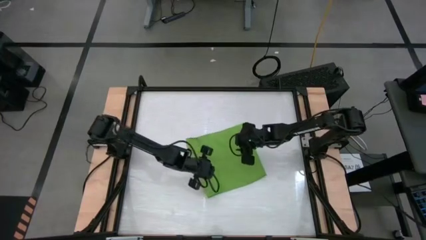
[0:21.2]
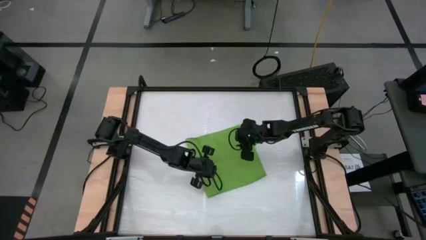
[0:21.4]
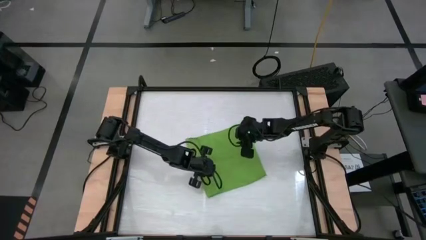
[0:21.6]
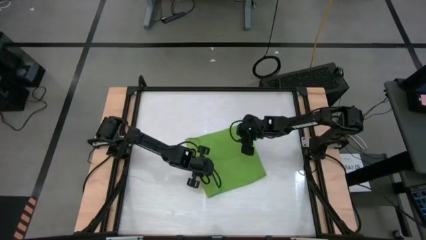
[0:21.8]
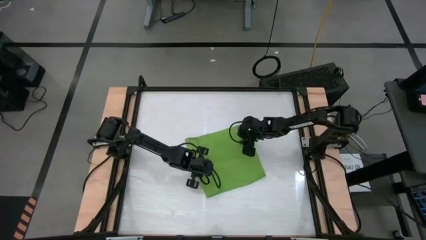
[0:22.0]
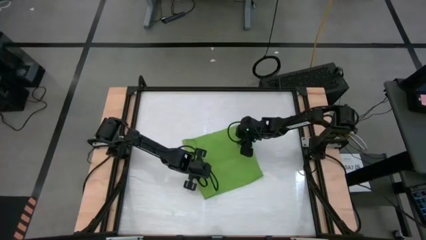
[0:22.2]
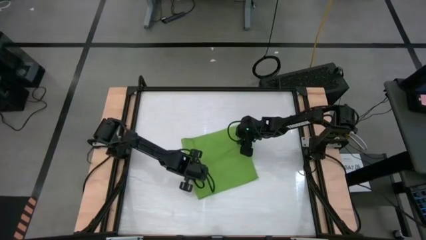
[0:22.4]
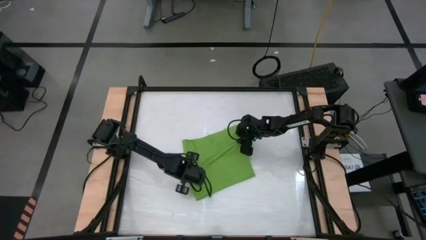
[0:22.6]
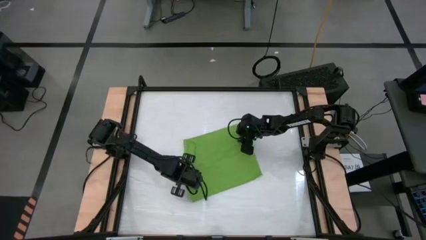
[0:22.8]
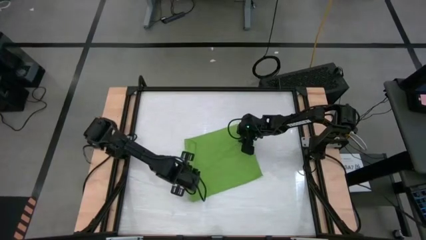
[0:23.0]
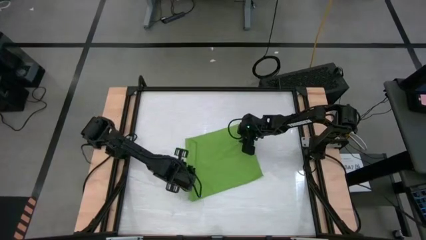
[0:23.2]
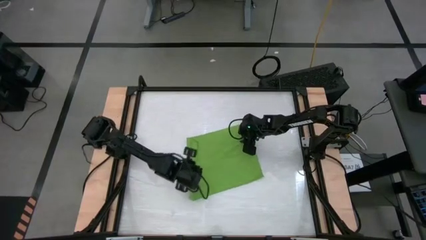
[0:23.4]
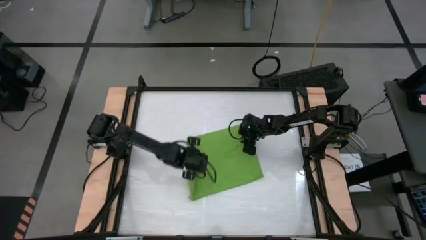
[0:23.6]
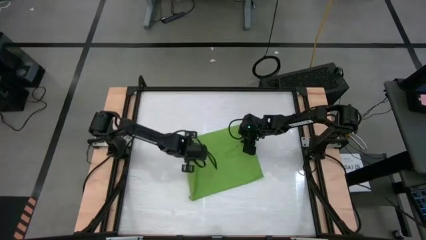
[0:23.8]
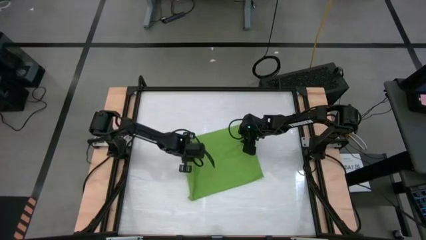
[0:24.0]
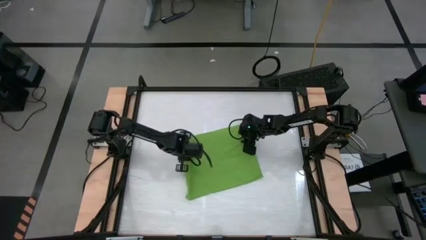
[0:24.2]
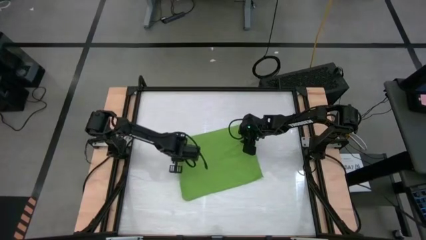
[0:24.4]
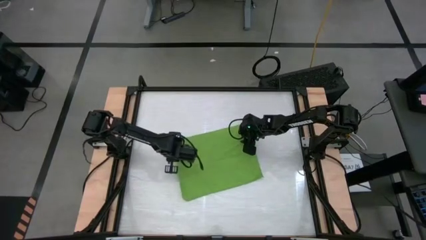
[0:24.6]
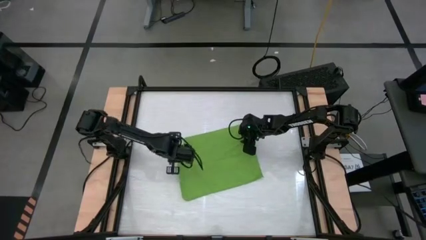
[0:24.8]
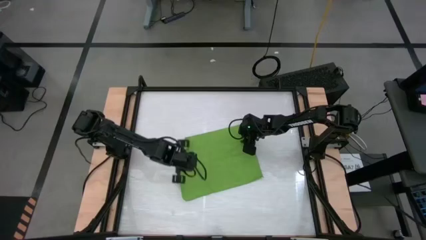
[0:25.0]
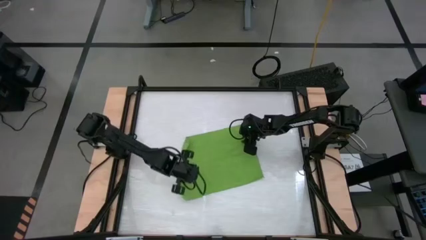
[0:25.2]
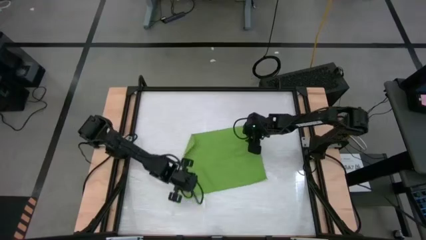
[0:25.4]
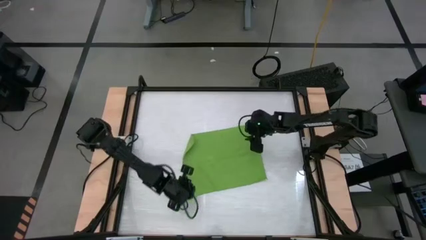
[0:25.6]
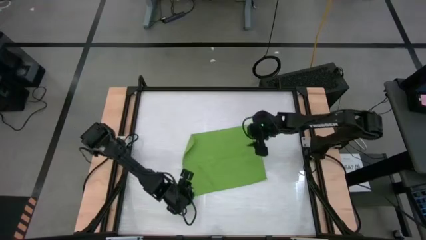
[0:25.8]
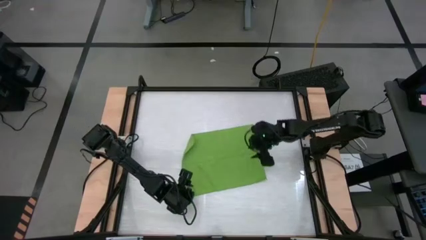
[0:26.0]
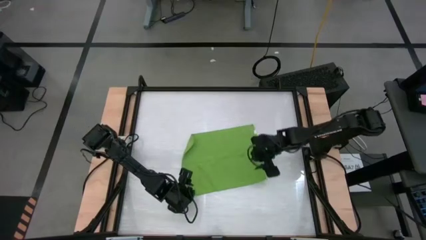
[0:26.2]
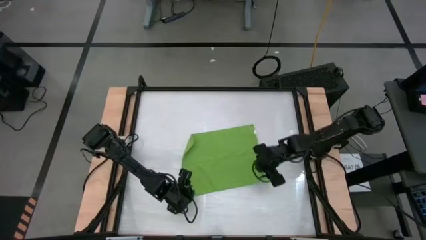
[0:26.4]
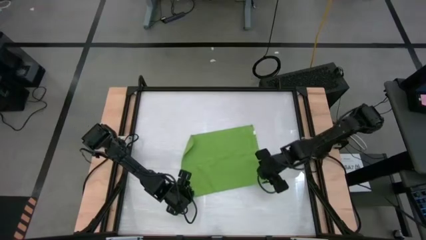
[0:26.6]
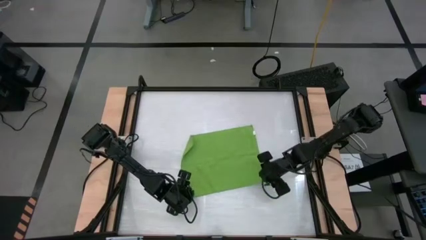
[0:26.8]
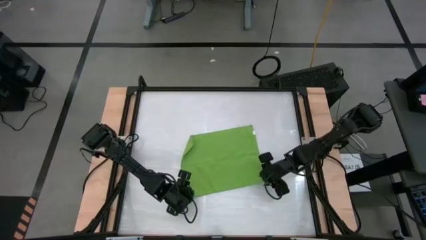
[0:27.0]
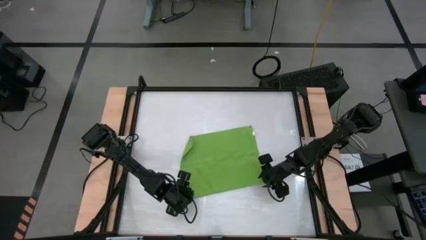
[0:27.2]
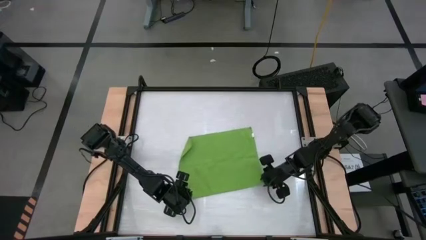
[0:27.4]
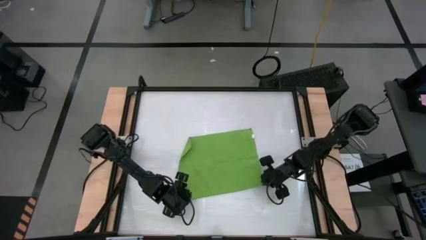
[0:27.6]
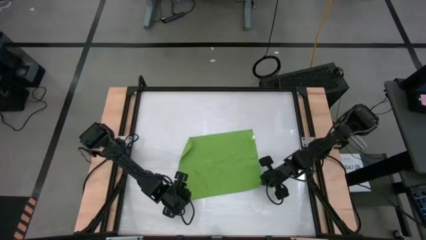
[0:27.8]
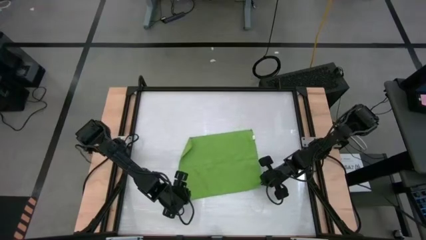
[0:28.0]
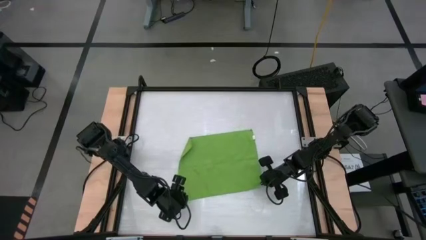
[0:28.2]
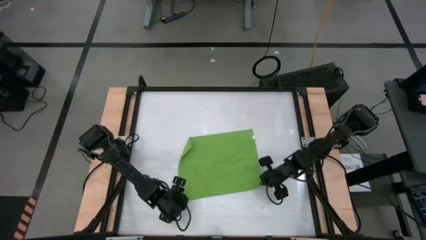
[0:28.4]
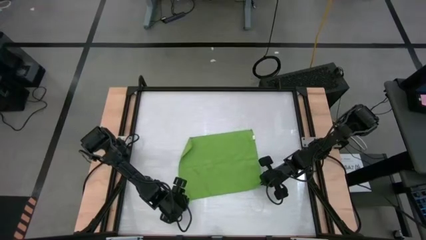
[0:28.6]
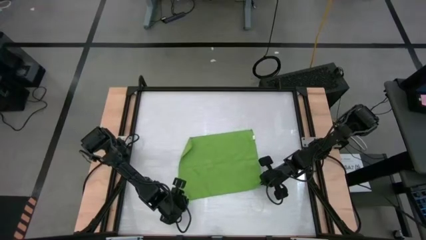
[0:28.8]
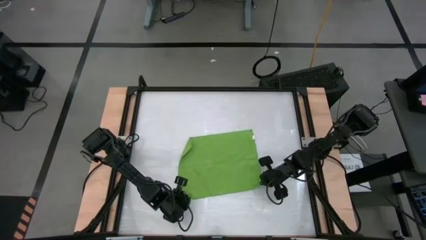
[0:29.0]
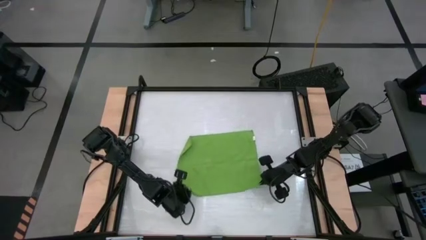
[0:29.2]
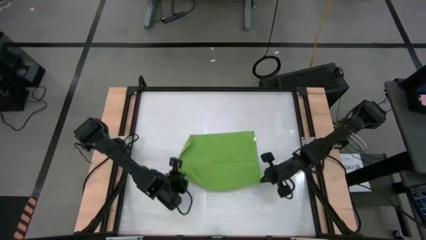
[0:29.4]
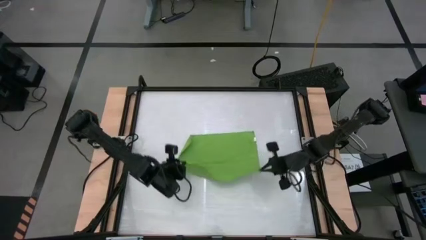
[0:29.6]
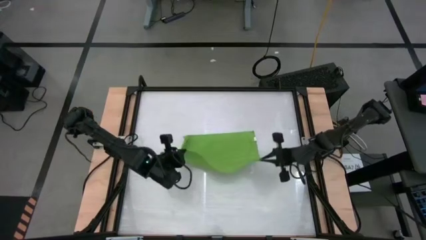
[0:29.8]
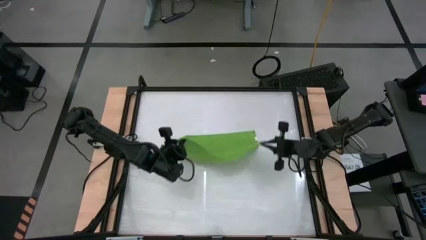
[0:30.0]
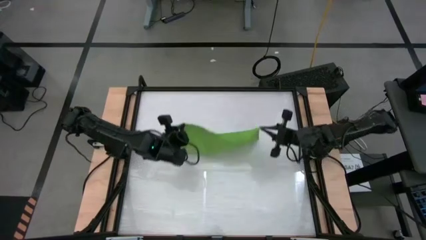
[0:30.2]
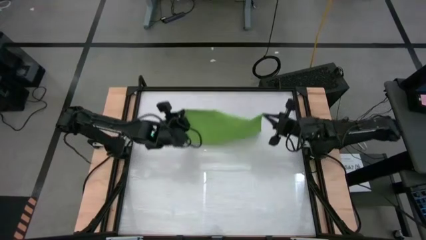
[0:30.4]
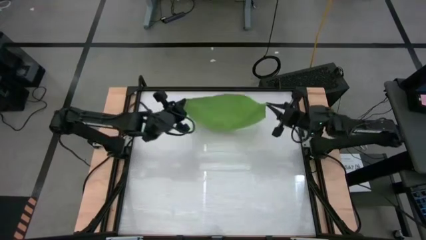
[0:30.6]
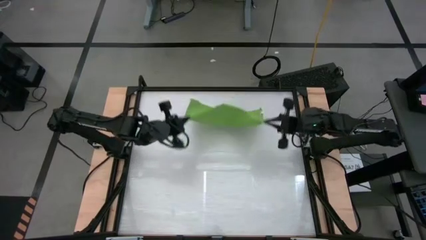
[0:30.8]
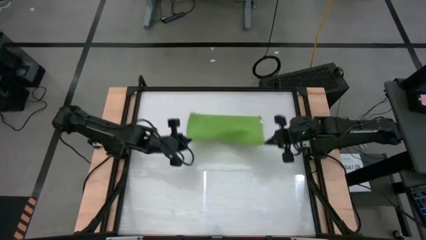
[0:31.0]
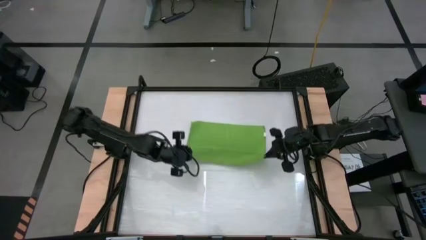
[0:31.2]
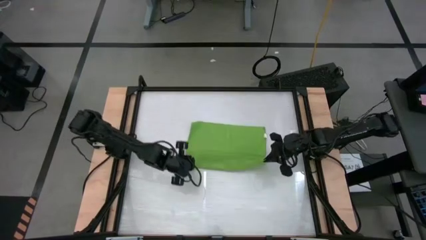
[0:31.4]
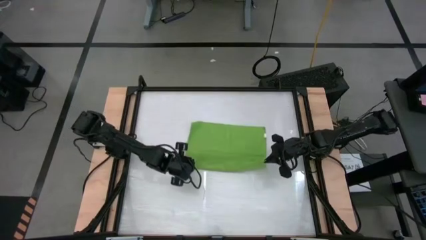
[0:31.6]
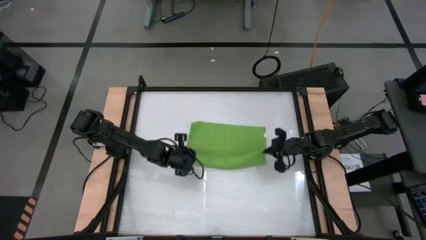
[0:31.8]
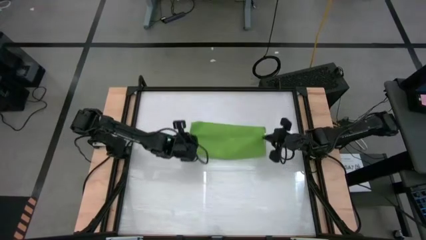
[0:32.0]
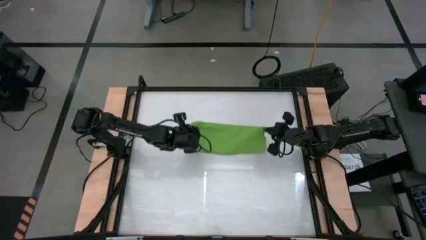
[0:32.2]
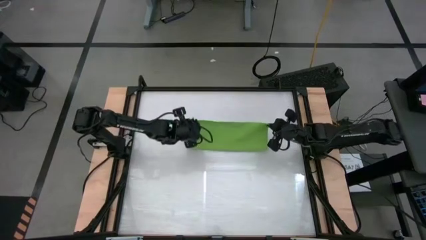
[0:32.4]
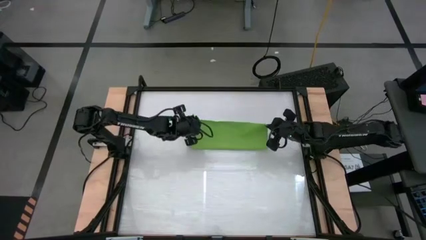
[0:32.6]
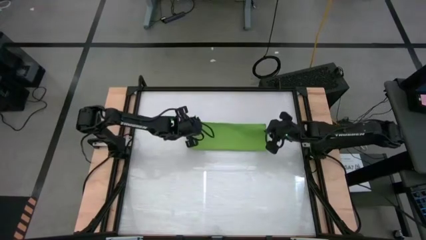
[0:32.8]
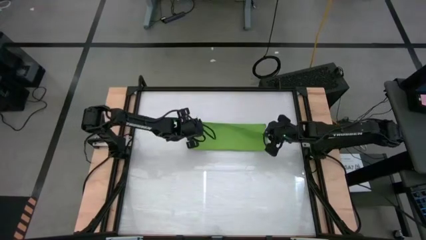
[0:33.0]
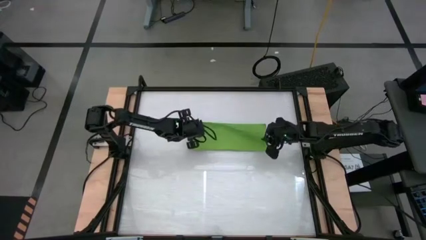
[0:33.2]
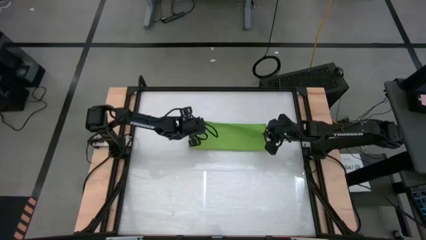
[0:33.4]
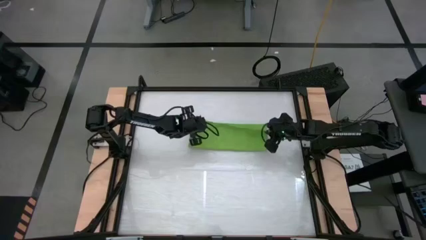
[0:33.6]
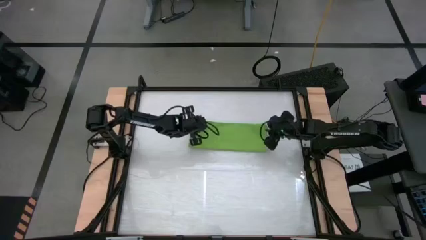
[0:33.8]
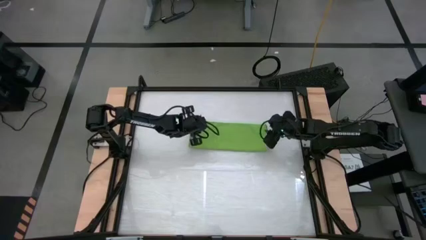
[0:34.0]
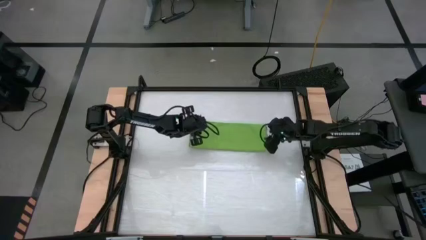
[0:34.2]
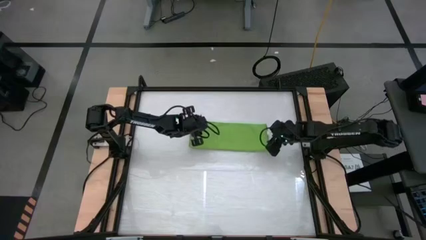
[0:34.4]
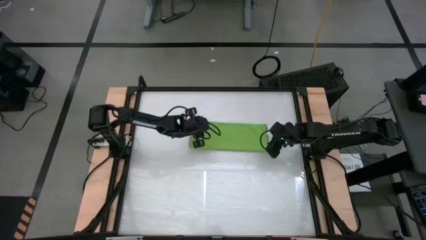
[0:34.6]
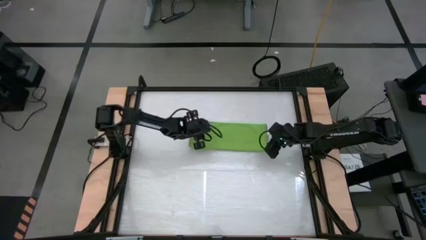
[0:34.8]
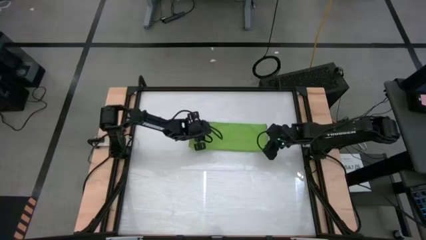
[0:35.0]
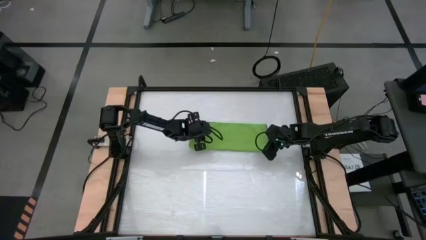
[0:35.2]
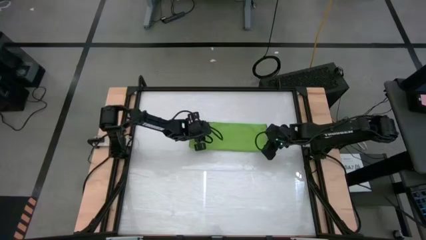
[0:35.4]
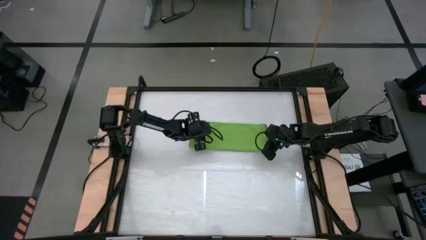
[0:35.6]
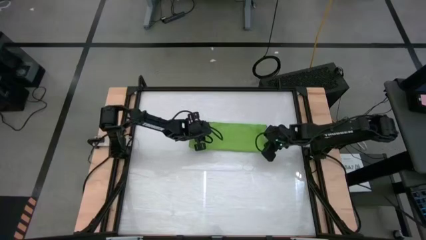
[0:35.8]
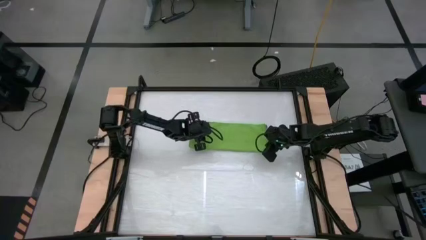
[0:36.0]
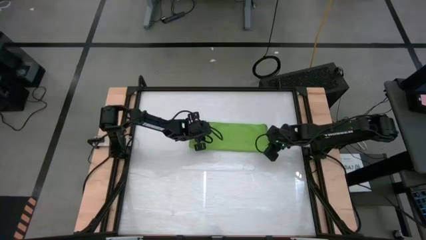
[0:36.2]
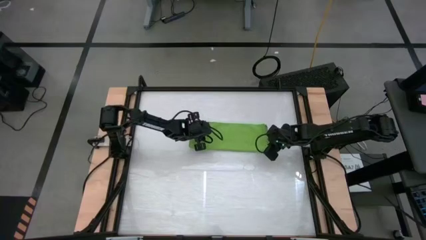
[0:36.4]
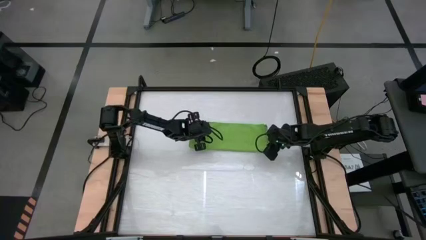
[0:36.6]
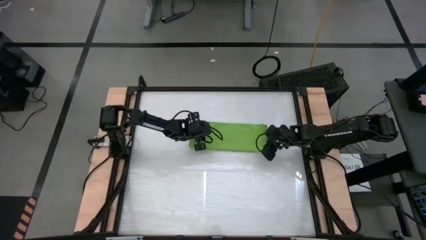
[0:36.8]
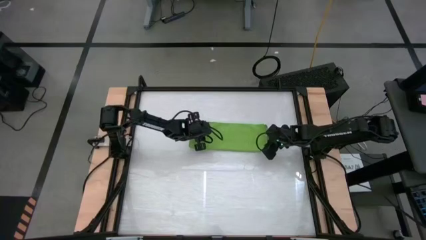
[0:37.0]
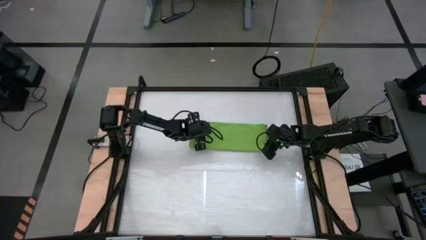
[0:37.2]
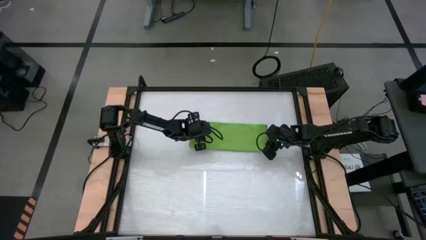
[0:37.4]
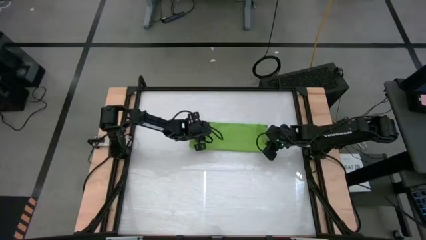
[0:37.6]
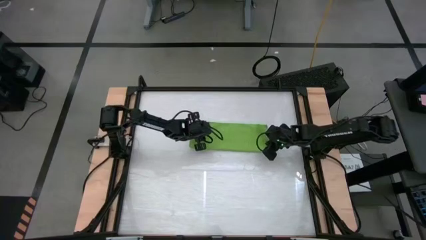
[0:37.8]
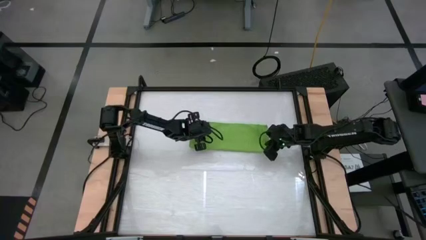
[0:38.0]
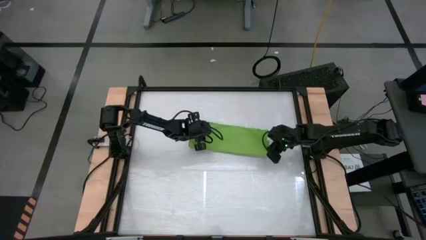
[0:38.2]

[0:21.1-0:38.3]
Task: Roll towel
Roll the green microfiber cloth
